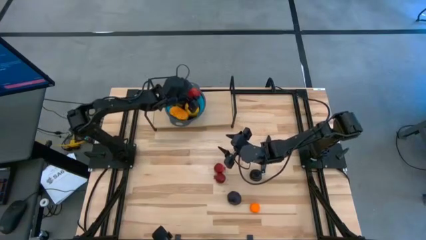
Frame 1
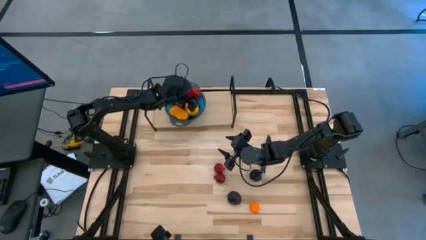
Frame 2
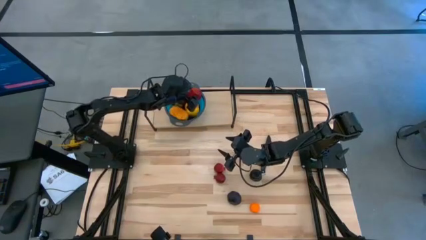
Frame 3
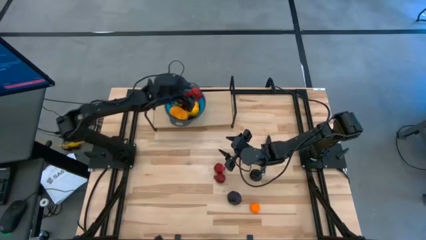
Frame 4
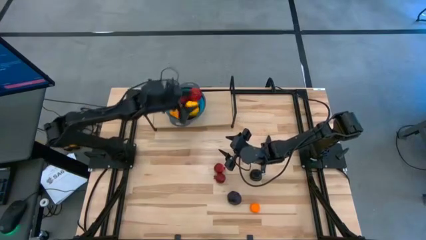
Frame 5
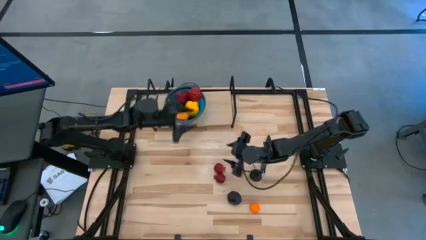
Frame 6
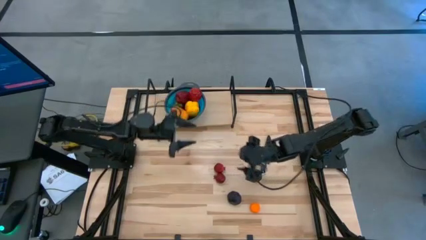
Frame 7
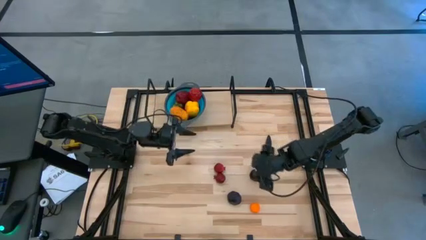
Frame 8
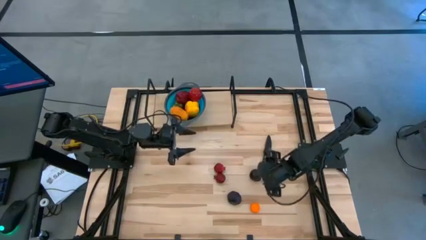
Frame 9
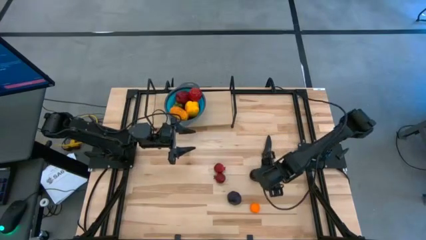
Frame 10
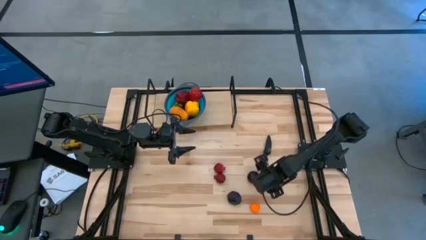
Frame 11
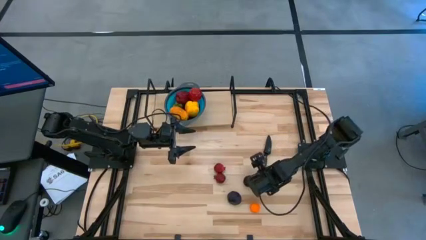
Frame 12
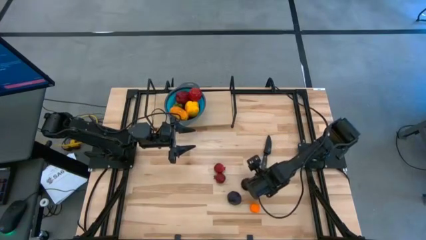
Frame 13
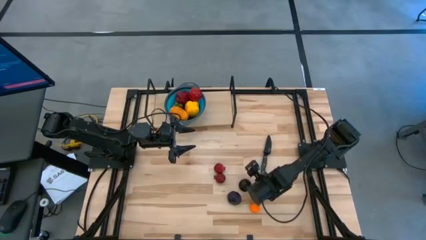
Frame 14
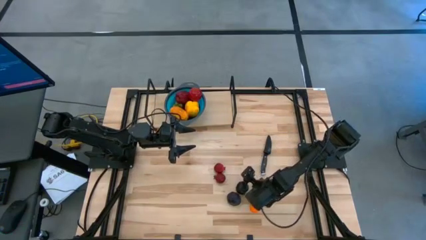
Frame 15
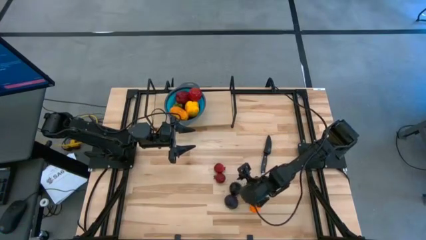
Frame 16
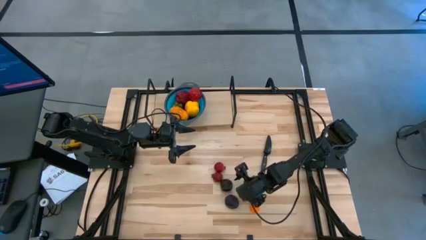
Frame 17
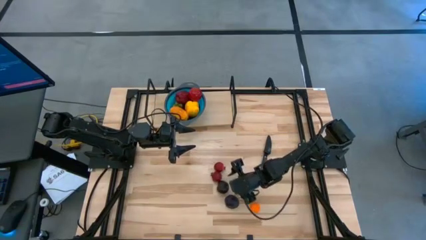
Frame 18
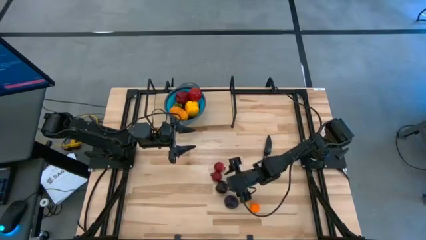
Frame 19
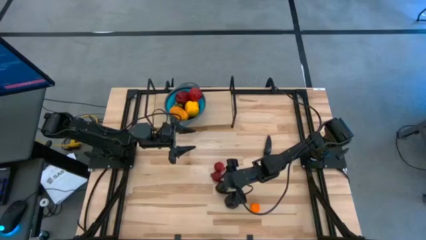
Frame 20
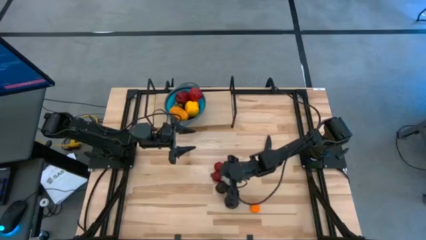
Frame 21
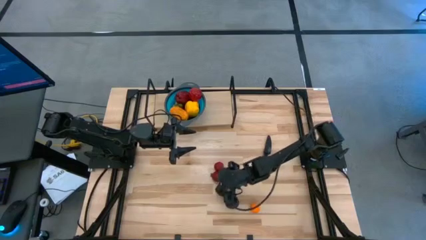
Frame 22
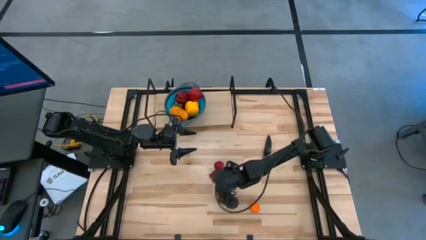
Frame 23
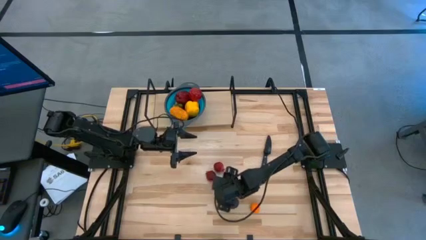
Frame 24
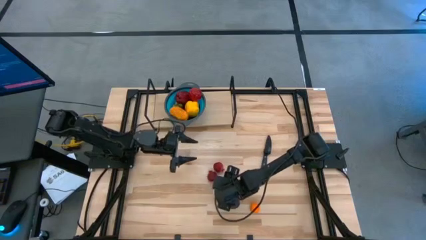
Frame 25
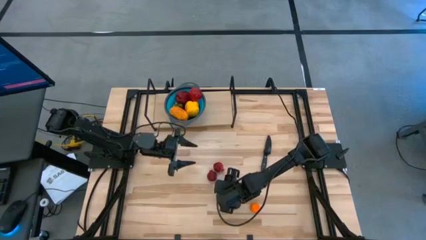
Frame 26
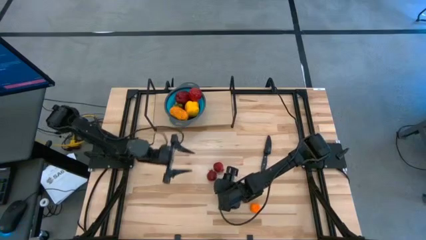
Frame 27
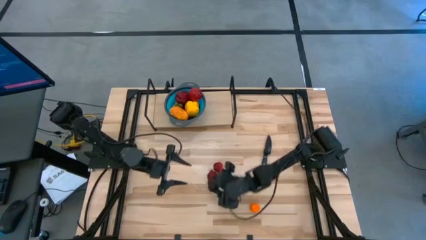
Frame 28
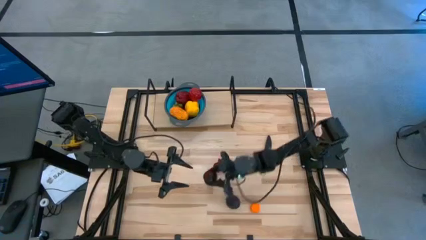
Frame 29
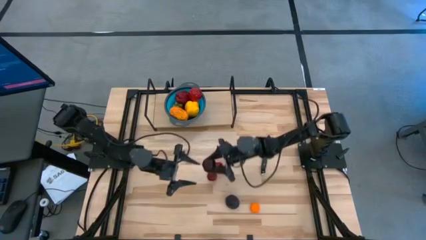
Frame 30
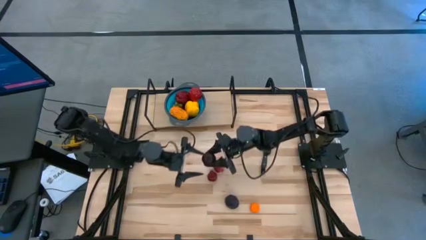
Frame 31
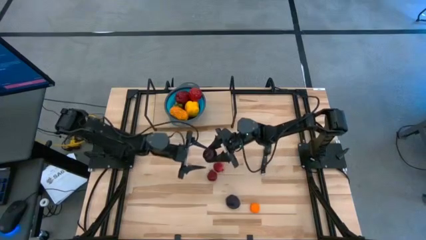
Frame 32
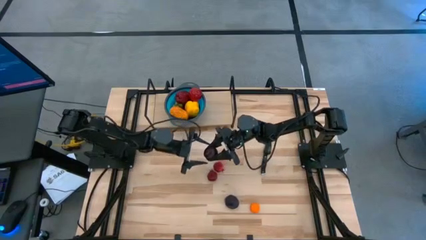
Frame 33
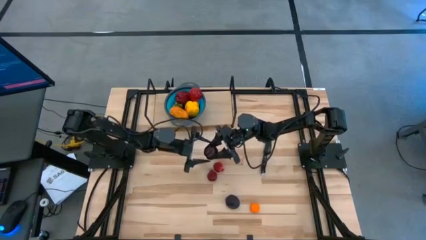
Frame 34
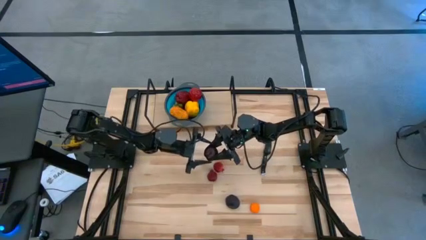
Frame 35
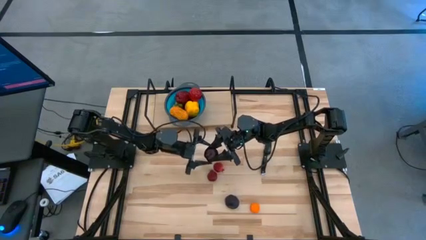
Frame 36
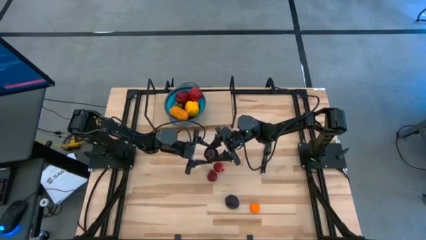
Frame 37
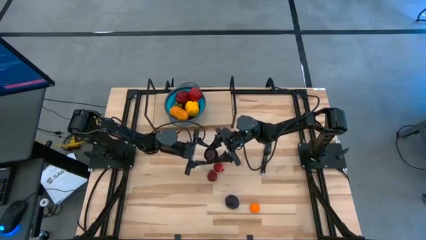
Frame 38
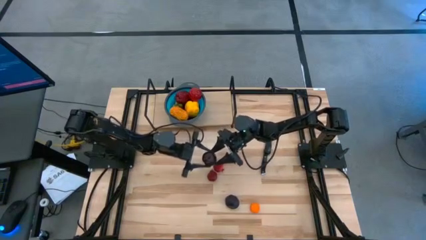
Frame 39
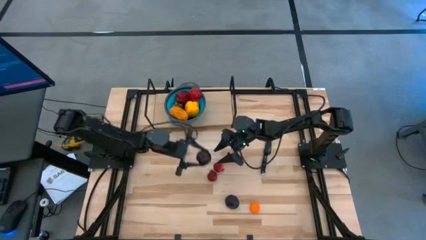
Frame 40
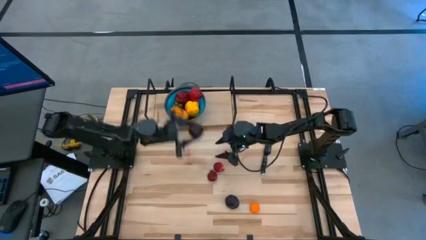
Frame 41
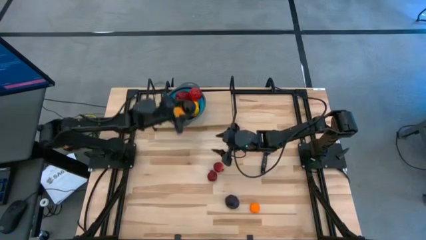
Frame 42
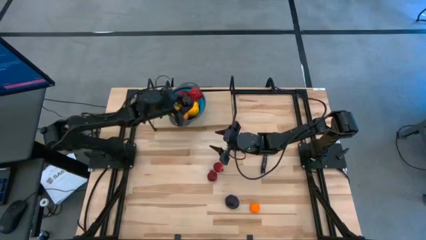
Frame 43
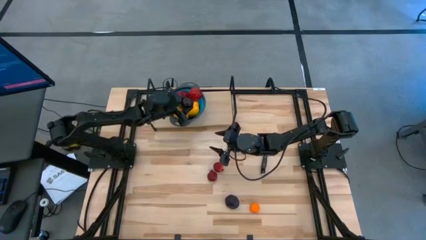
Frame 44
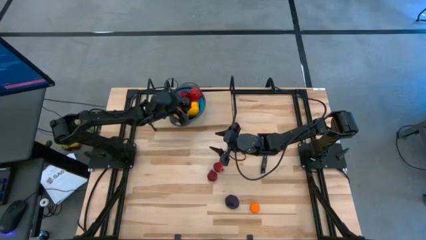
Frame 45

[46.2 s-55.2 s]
Task: Pick & Place Fruit
Put the top plum into the blue strainer bowl on the shelf

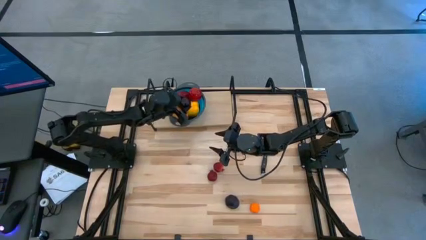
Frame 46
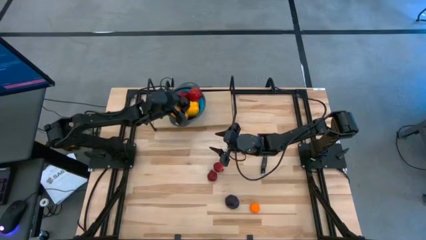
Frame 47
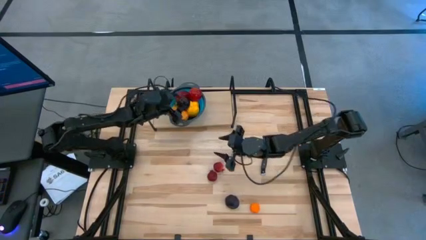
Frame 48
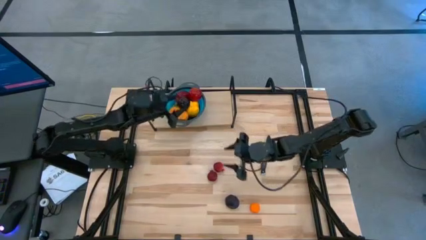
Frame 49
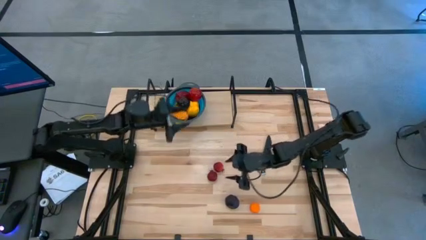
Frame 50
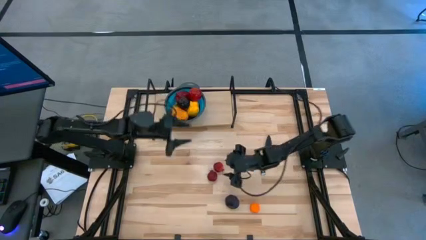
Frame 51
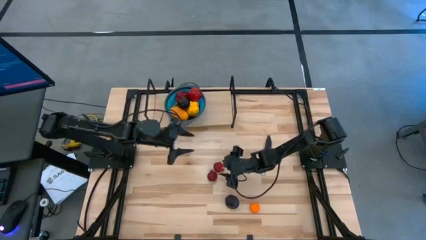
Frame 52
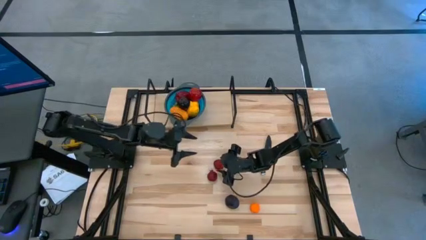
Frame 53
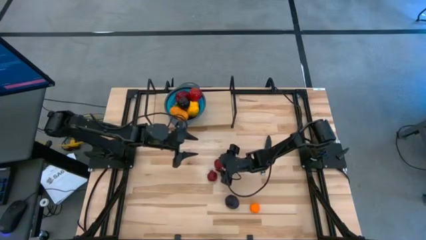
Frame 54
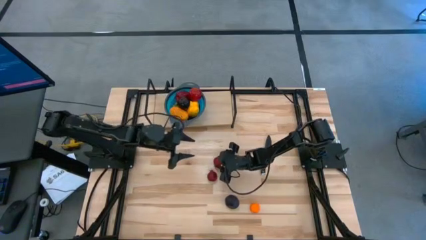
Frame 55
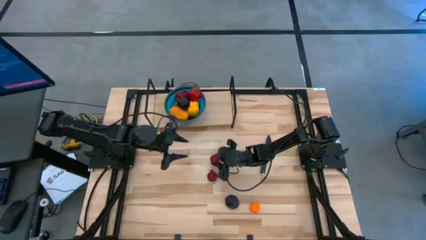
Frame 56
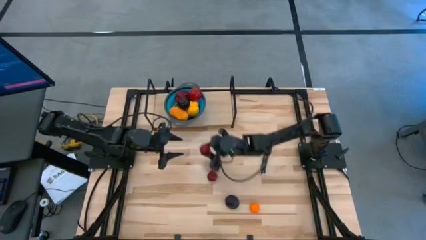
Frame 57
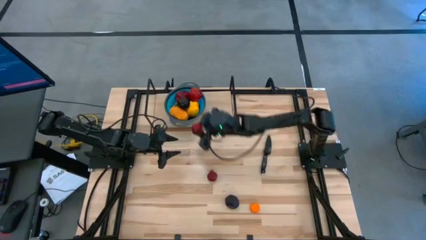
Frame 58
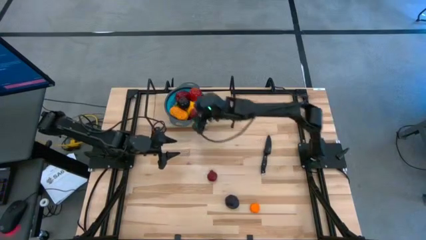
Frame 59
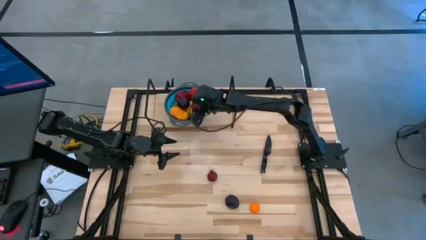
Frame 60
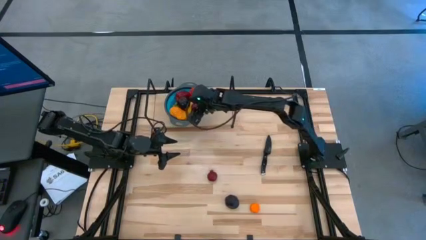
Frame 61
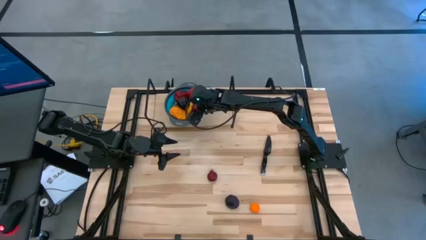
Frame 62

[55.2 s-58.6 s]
Put the top pomegranate into the blue strainer bowl on the shelf

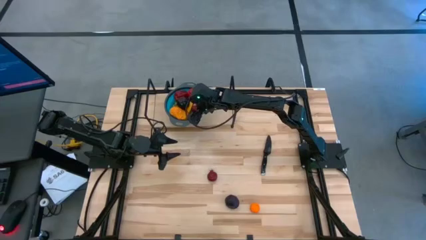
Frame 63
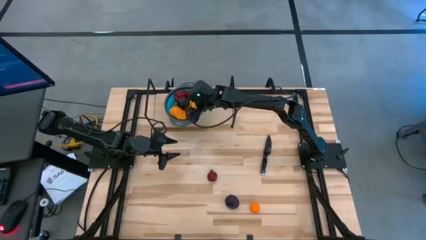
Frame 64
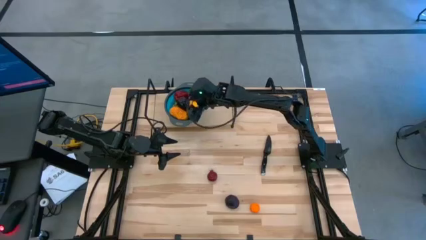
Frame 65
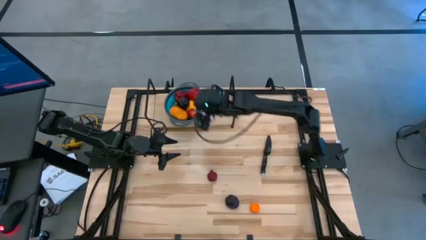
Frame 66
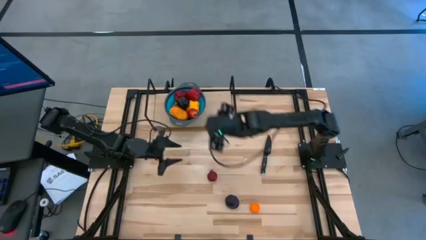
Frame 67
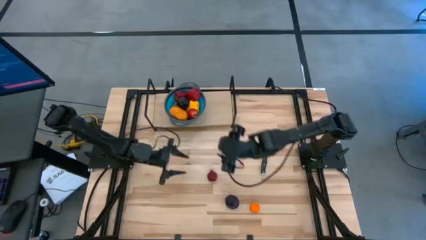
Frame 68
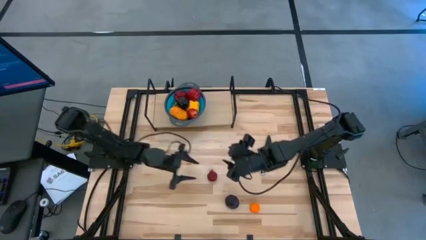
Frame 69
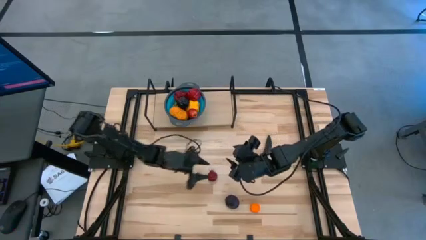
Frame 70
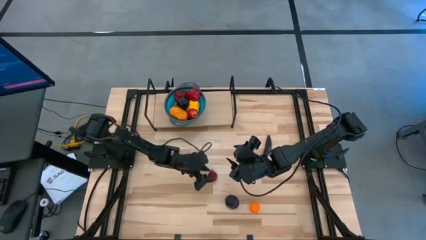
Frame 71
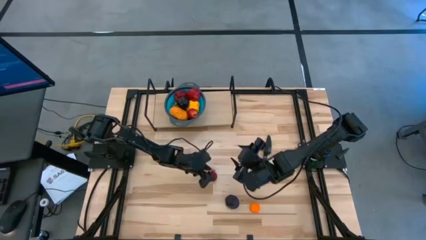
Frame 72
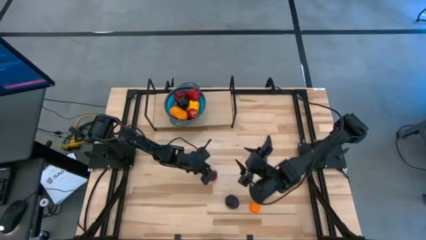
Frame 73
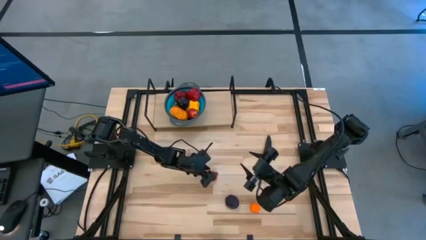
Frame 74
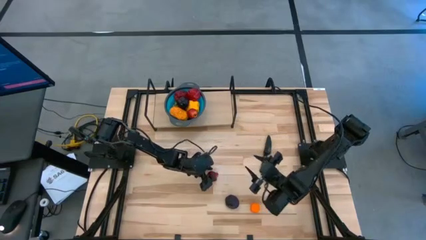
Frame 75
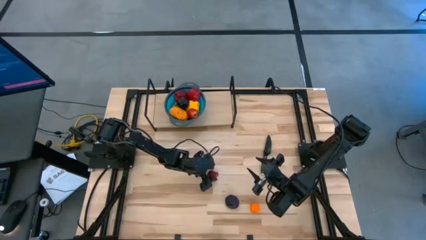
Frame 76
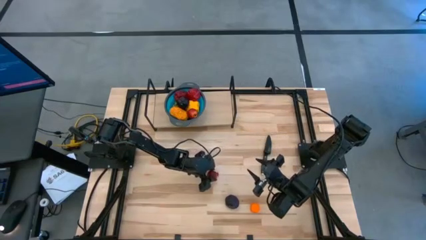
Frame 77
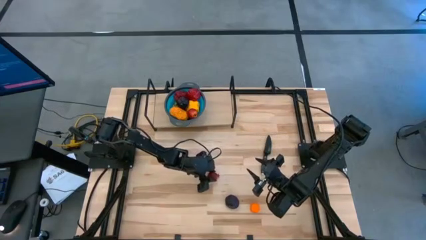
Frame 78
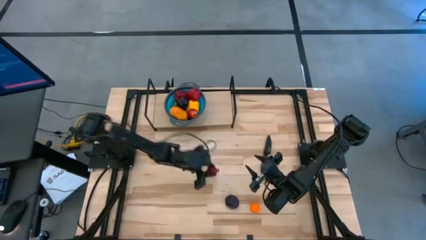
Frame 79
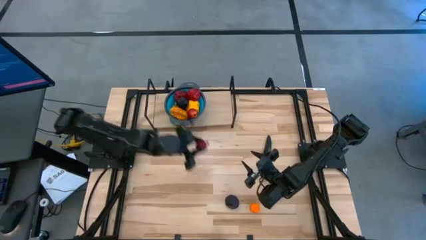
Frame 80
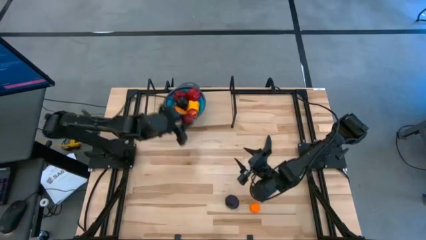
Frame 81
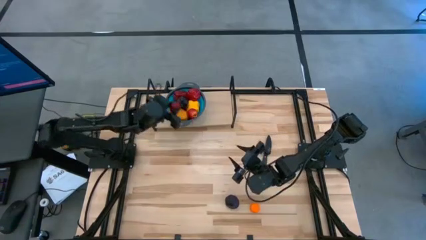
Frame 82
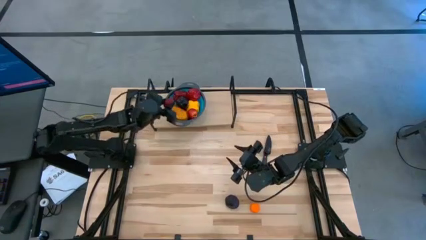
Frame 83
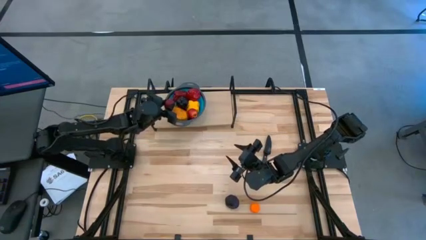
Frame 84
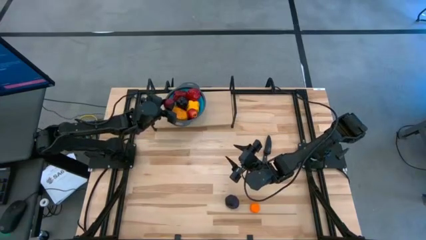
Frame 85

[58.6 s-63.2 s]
Put the pomegranate into the blue strainer bowl on the shelf
